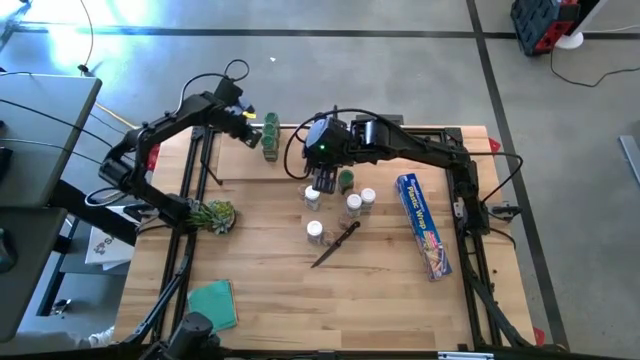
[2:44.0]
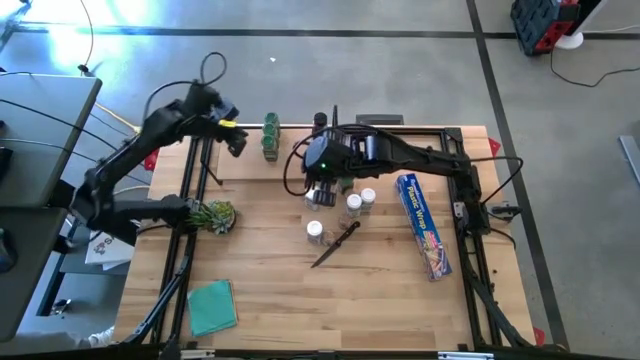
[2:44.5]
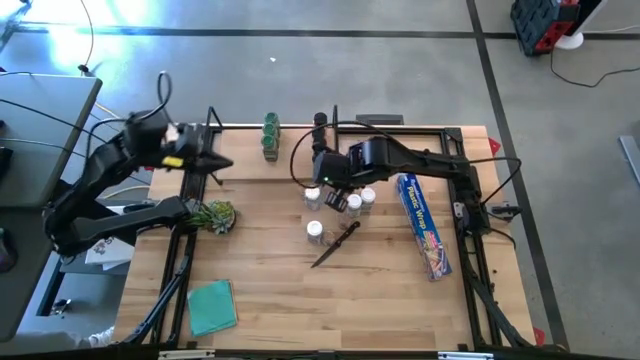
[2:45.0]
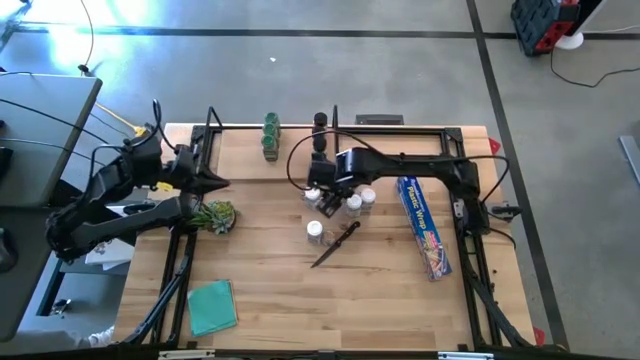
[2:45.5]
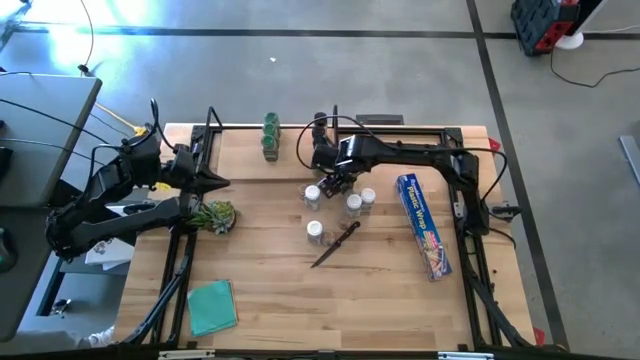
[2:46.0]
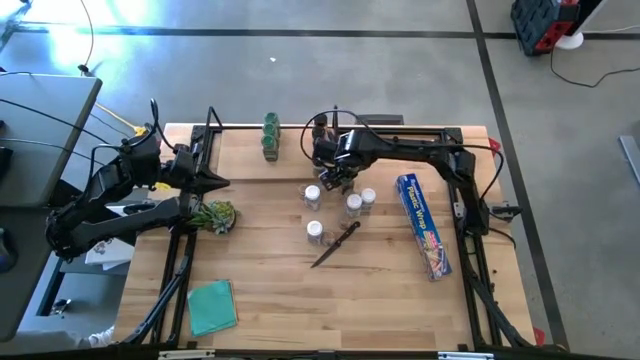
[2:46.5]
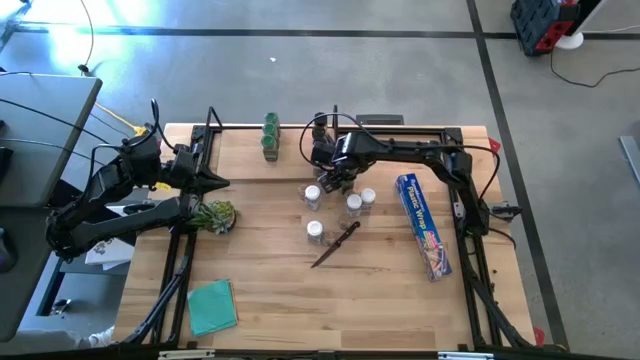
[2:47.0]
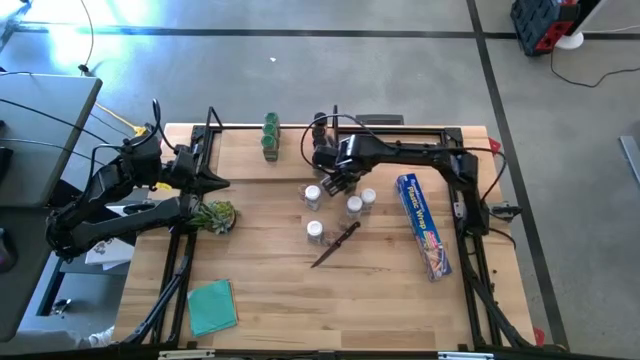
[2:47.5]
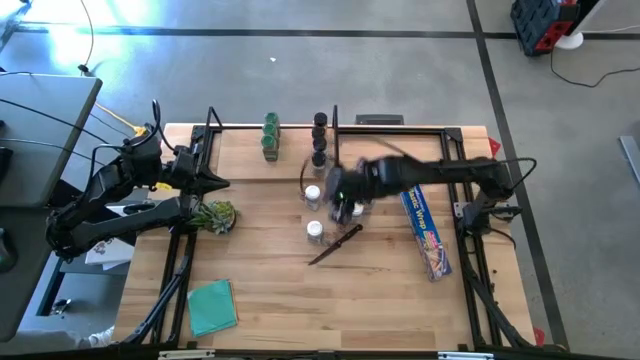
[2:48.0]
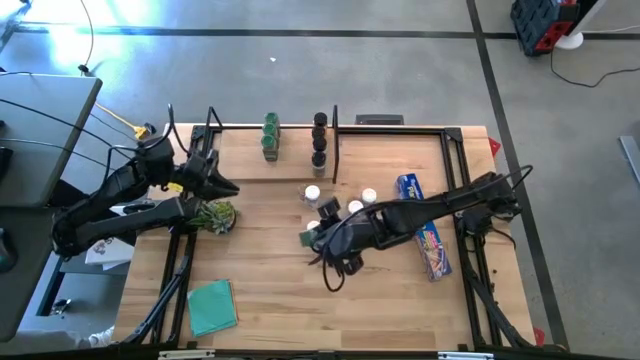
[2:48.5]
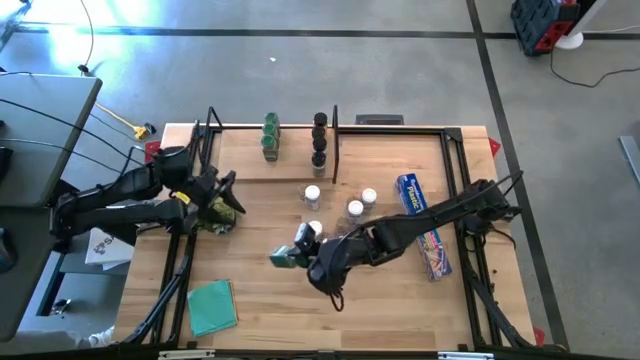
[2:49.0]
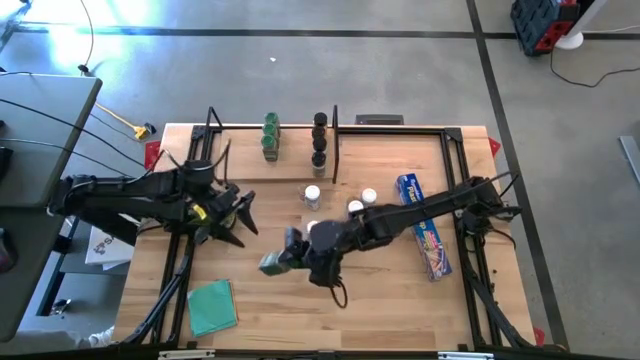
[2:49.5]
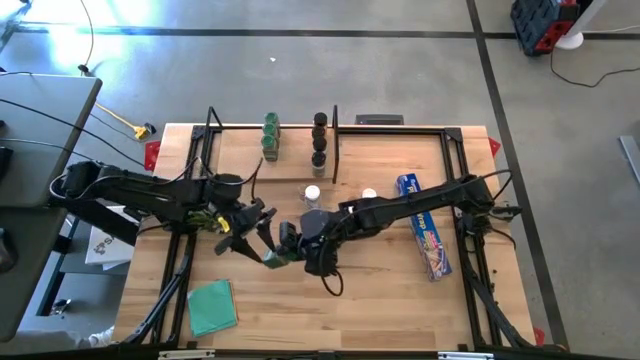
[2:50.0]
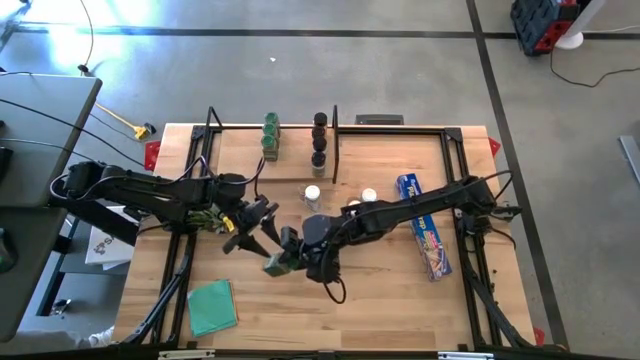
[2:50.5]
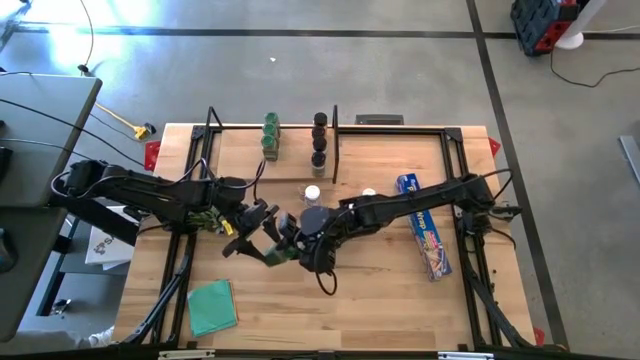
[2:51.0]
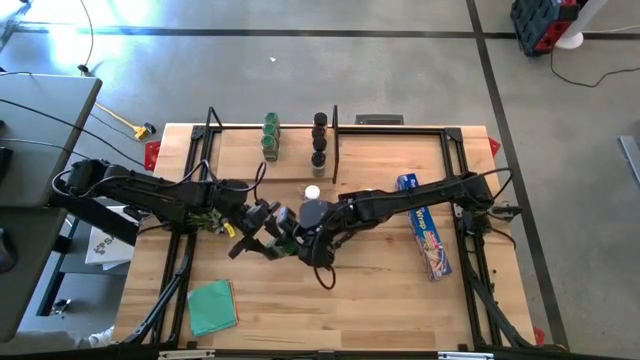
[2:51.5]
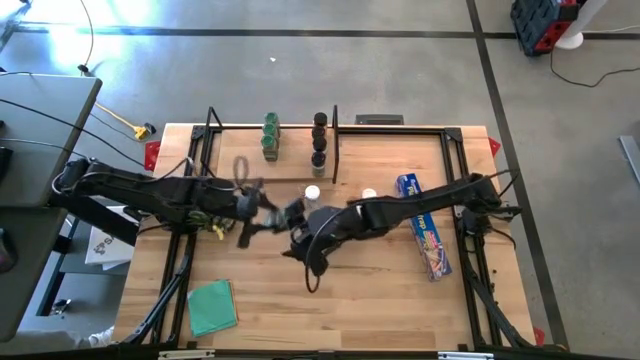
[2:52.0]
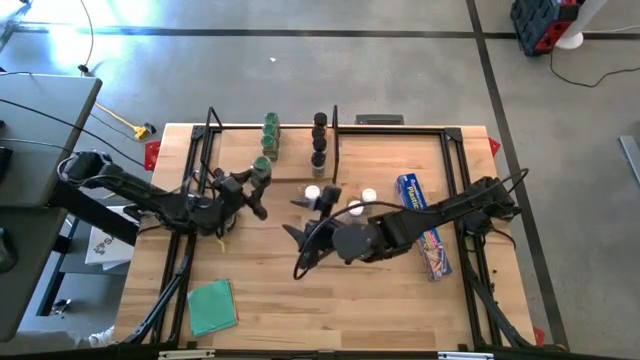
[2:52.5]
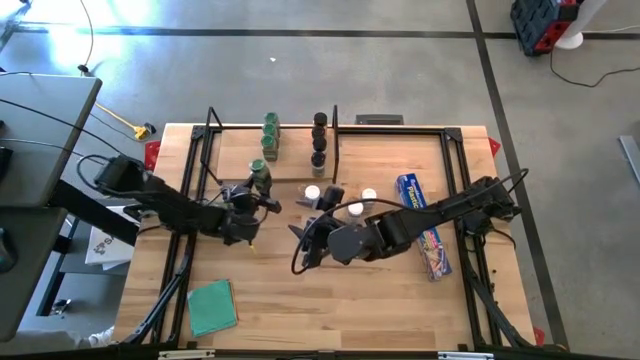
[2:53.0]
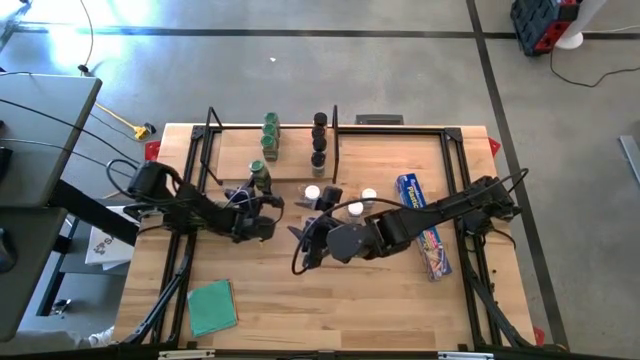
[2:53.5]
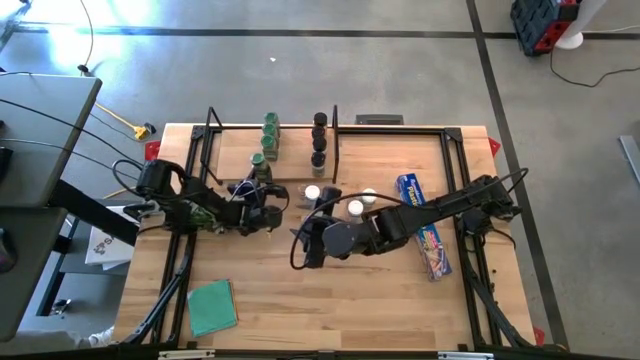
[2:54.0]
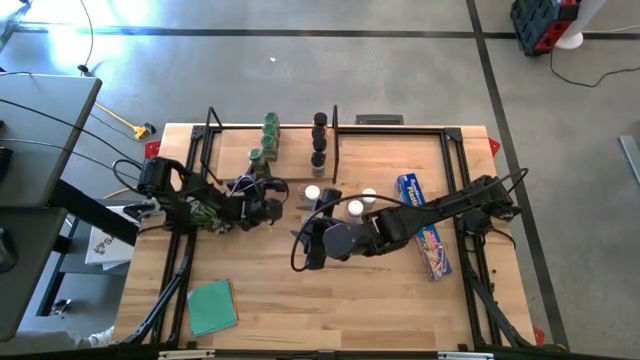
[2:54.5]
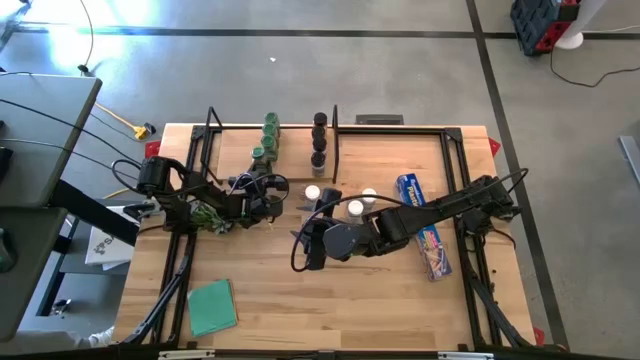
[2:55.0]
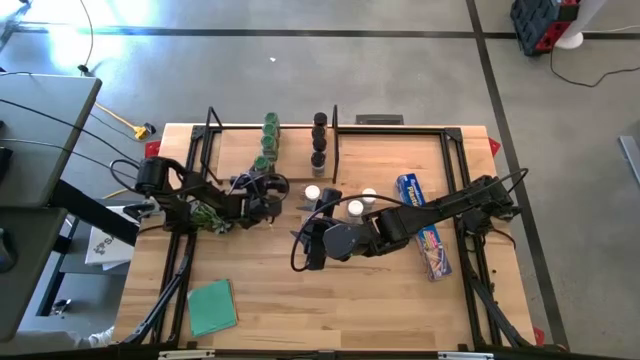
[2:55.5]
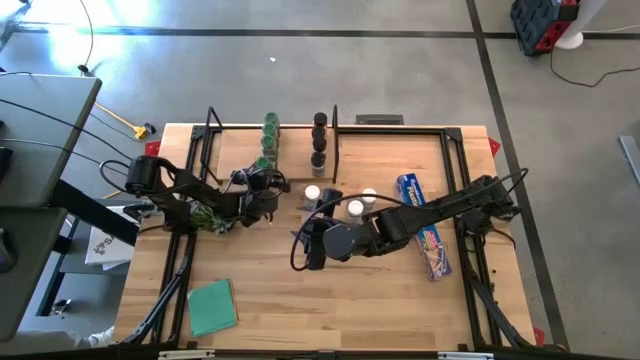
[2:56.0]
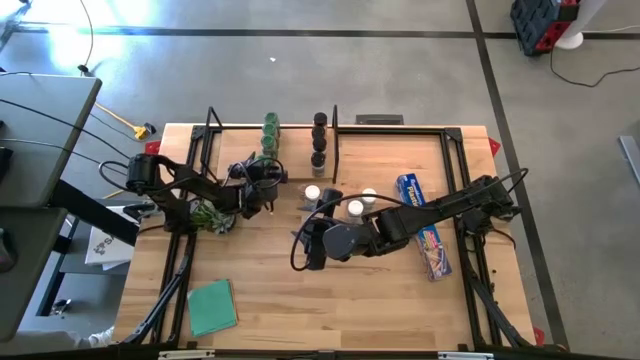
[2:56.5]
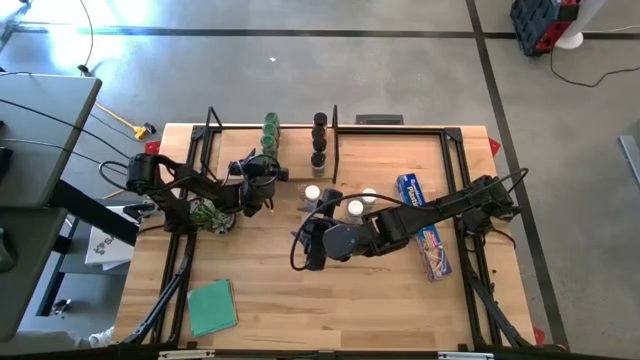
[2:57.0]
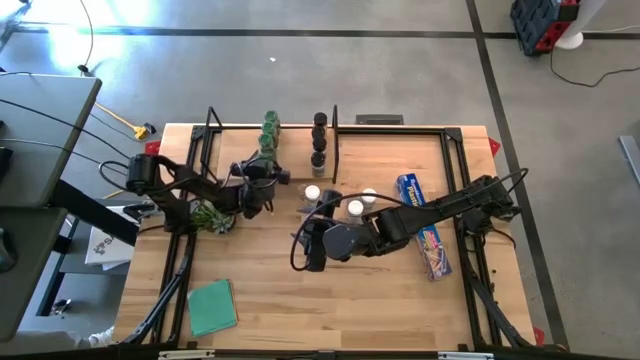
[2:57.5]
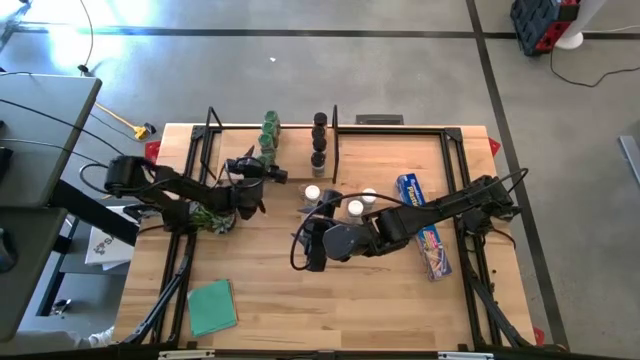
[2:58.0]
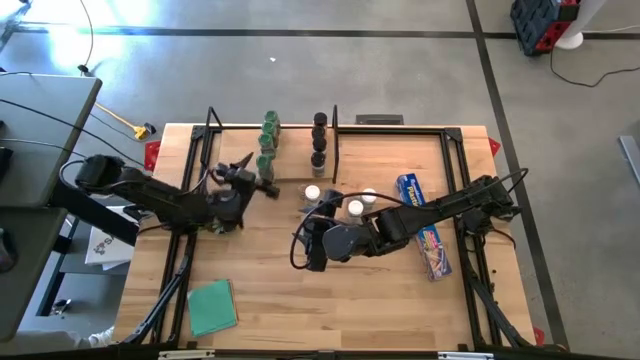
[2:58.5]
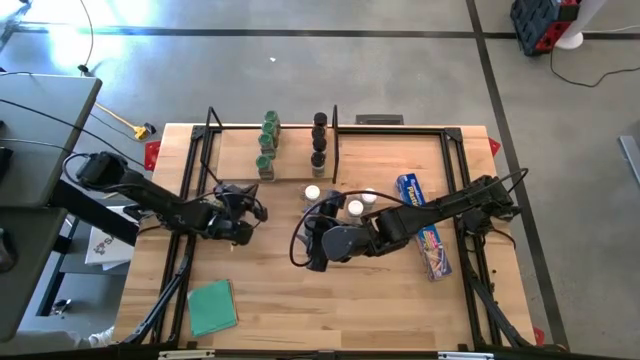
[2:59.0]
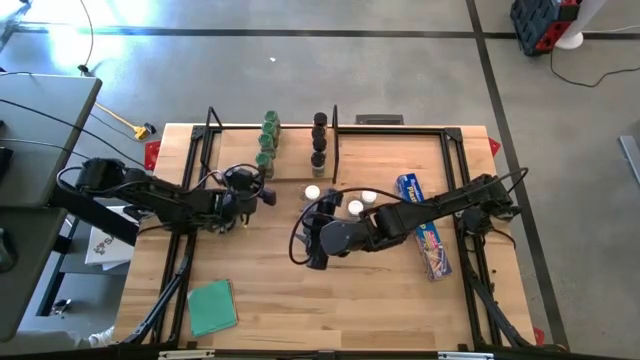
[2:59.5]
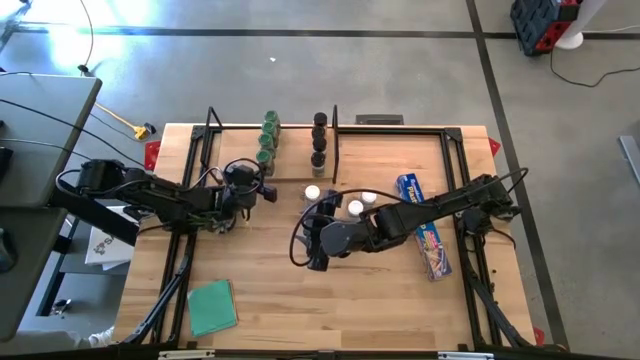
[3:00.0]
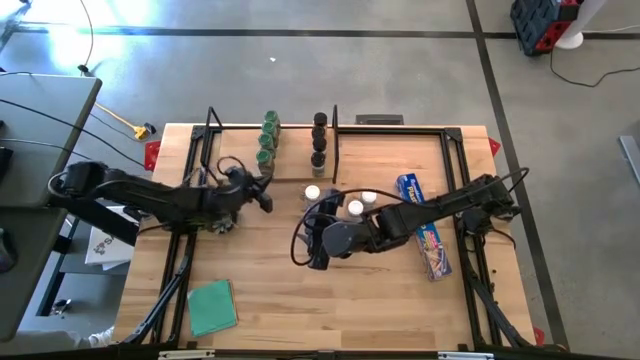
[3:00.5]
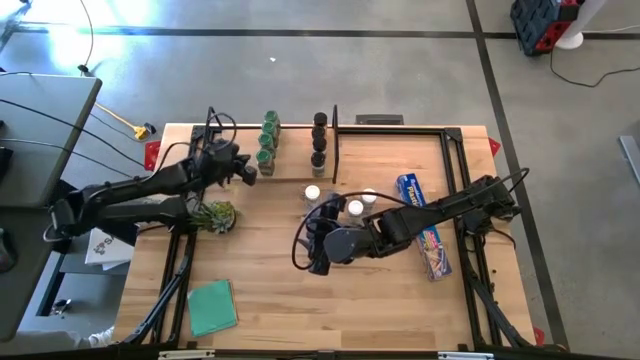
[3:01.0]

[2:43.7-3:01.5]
Task: Shelf spices
Put the green lid seasoning bottle on the shelf
